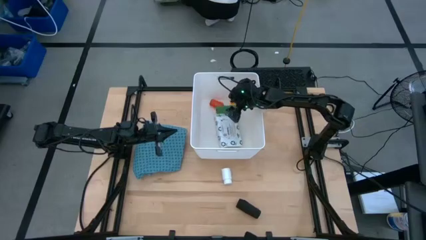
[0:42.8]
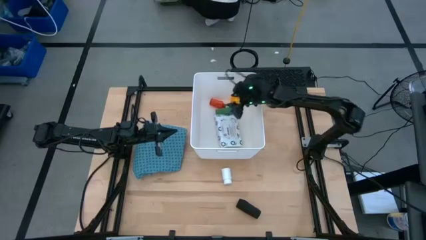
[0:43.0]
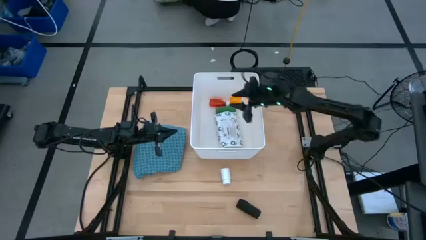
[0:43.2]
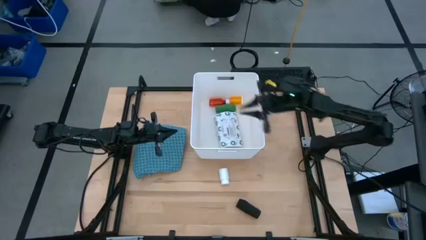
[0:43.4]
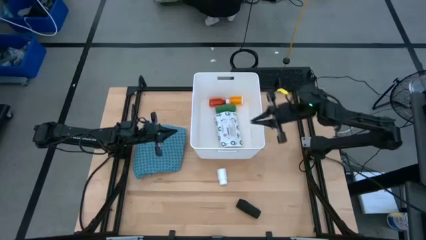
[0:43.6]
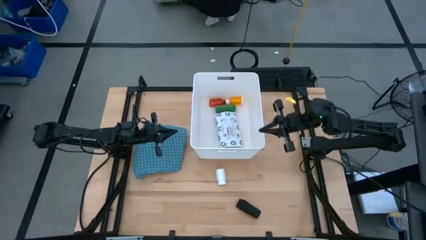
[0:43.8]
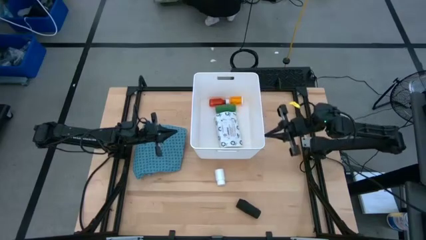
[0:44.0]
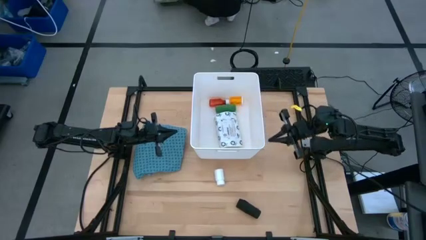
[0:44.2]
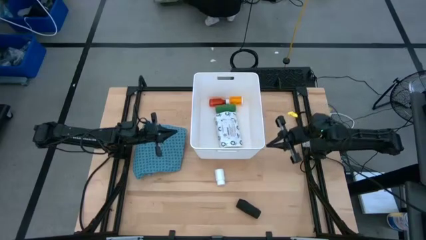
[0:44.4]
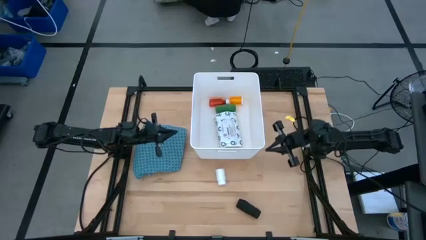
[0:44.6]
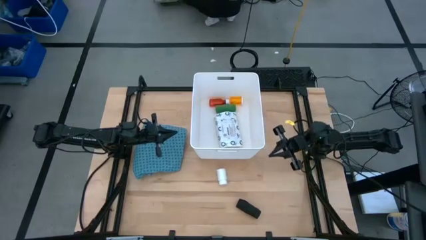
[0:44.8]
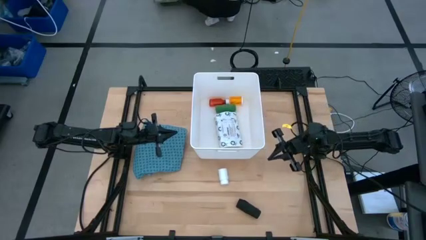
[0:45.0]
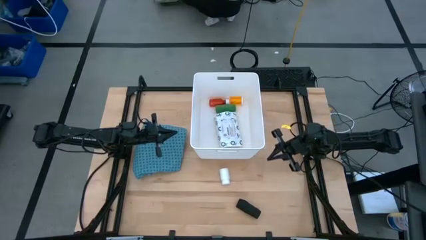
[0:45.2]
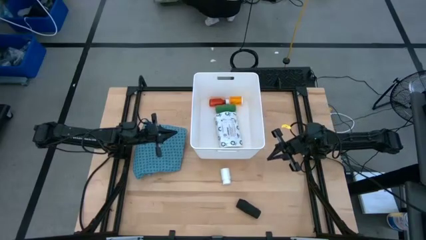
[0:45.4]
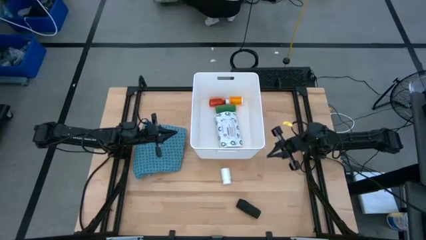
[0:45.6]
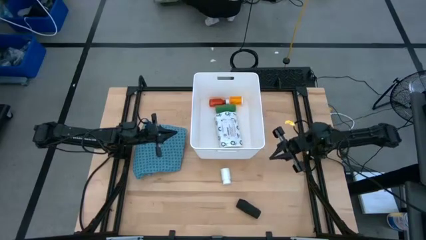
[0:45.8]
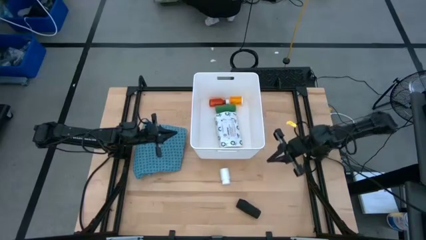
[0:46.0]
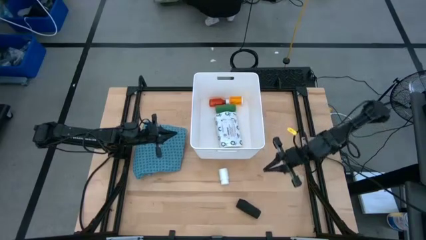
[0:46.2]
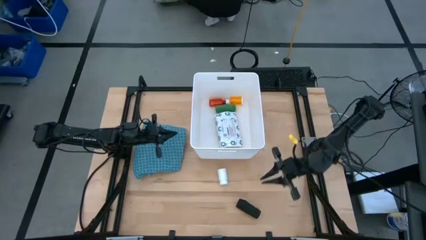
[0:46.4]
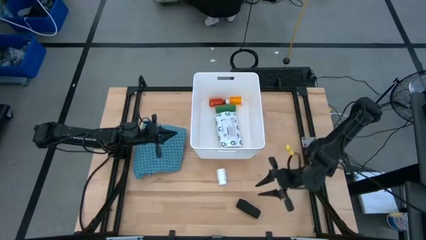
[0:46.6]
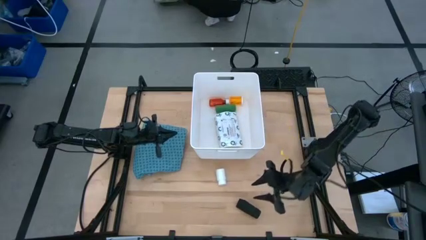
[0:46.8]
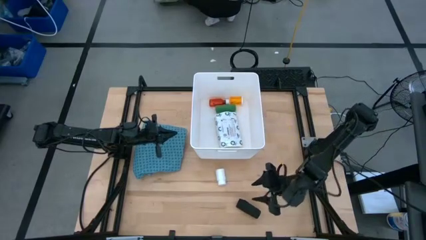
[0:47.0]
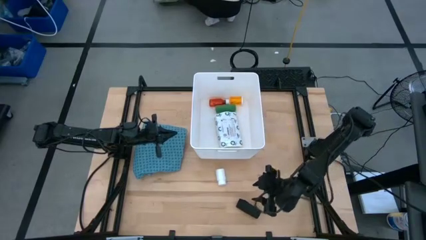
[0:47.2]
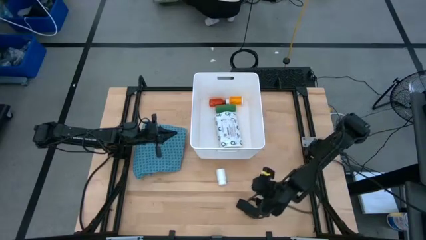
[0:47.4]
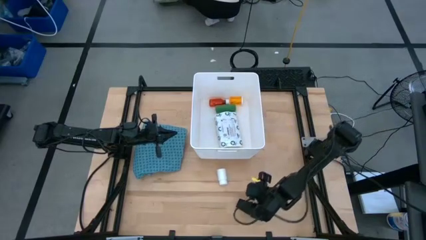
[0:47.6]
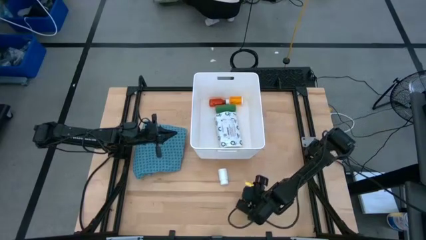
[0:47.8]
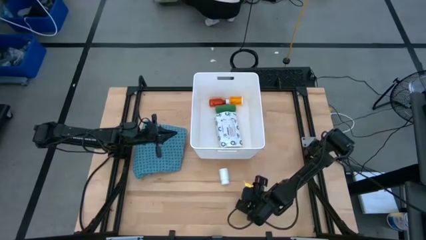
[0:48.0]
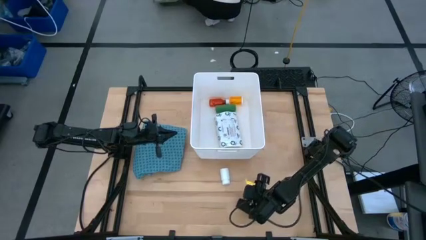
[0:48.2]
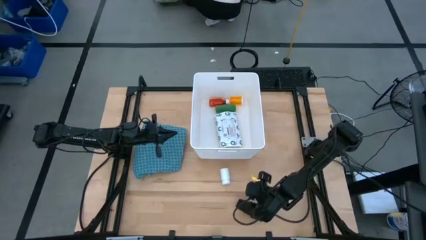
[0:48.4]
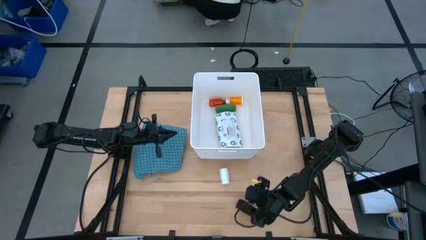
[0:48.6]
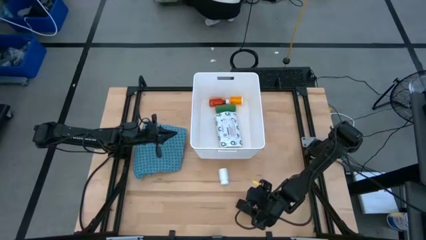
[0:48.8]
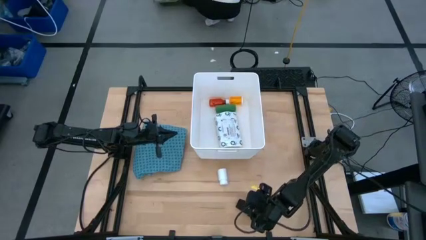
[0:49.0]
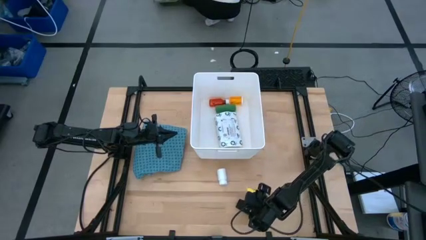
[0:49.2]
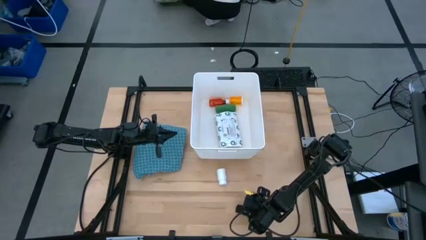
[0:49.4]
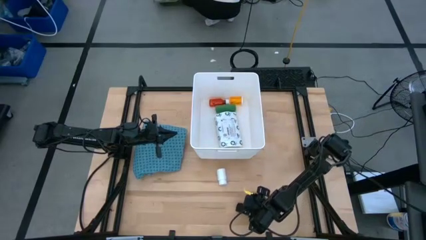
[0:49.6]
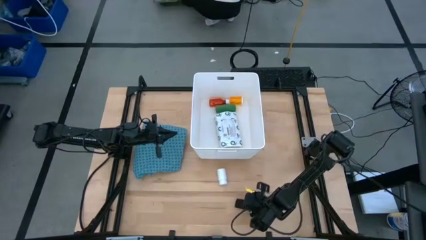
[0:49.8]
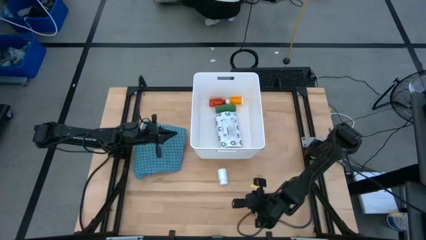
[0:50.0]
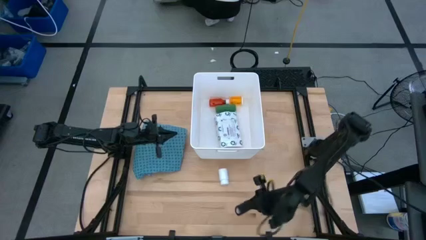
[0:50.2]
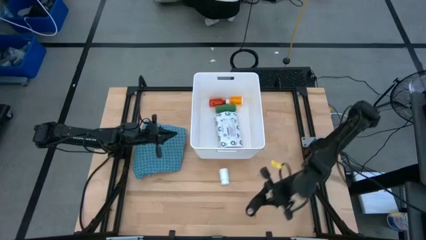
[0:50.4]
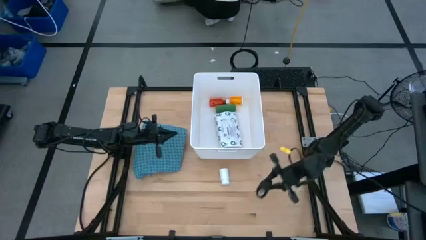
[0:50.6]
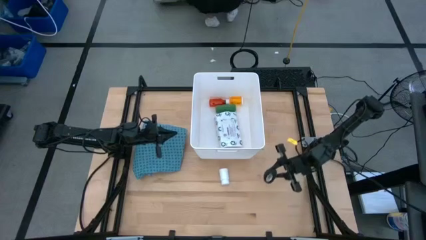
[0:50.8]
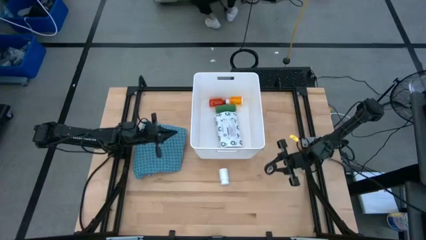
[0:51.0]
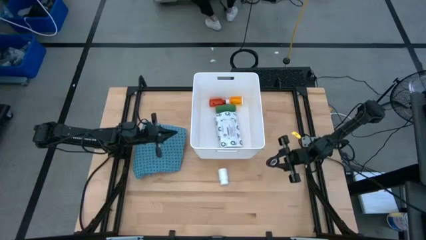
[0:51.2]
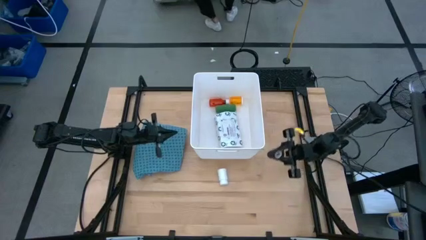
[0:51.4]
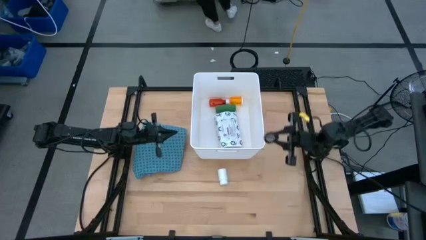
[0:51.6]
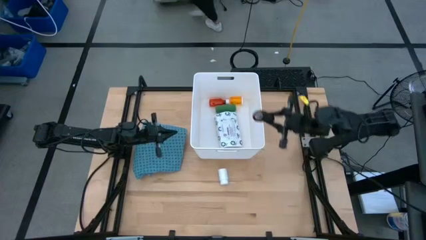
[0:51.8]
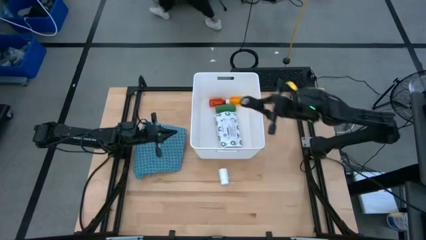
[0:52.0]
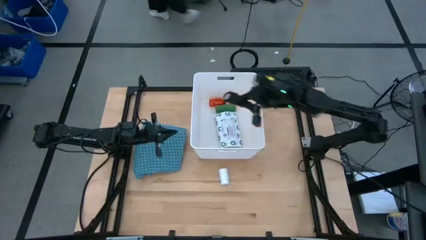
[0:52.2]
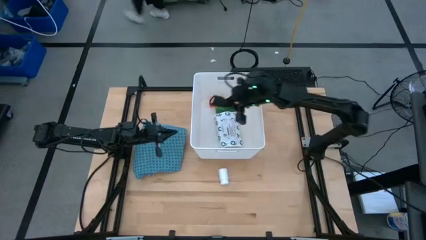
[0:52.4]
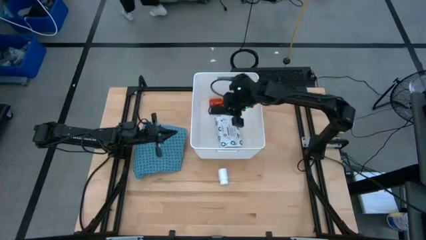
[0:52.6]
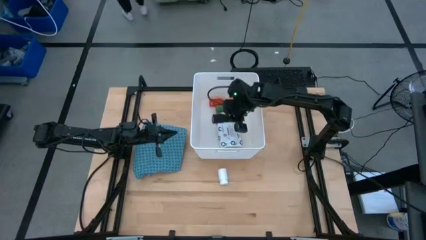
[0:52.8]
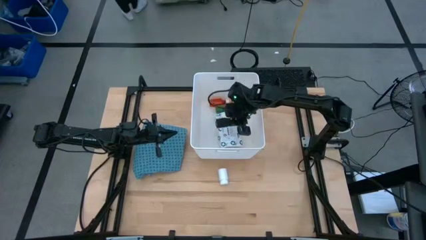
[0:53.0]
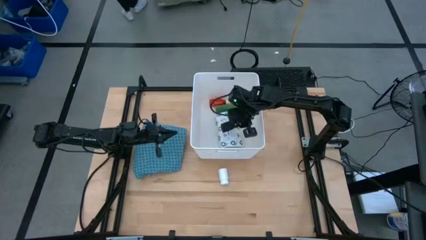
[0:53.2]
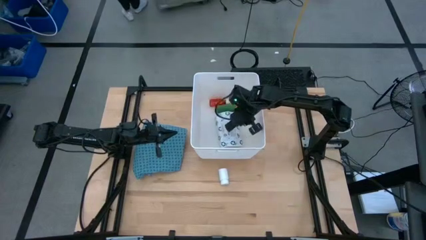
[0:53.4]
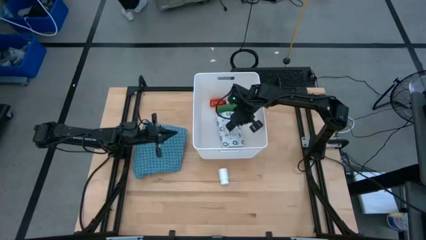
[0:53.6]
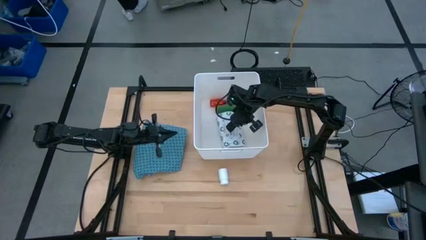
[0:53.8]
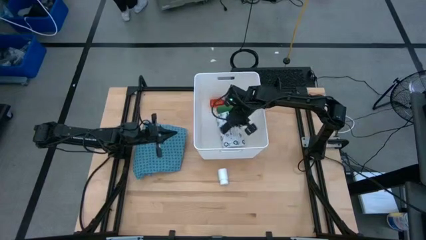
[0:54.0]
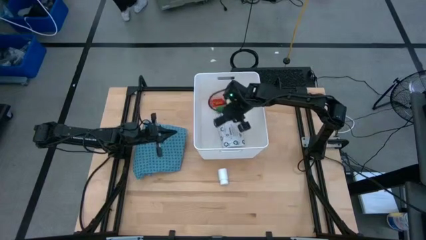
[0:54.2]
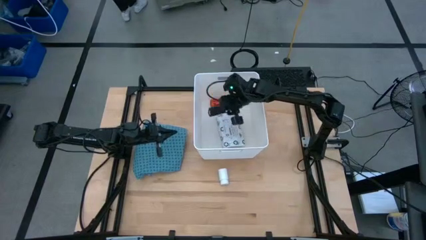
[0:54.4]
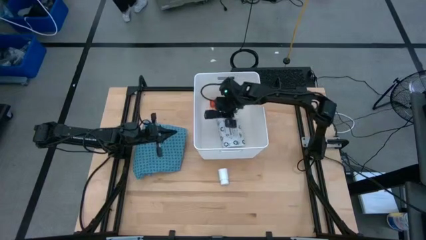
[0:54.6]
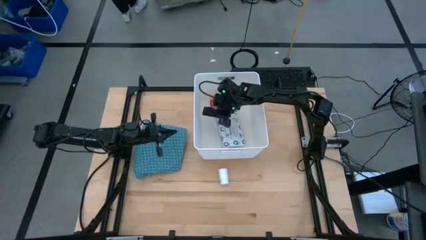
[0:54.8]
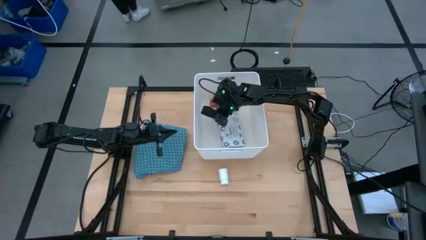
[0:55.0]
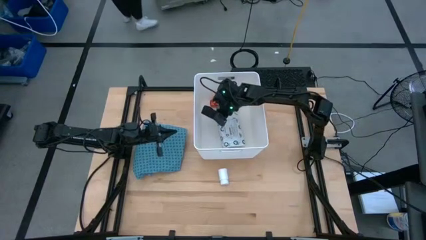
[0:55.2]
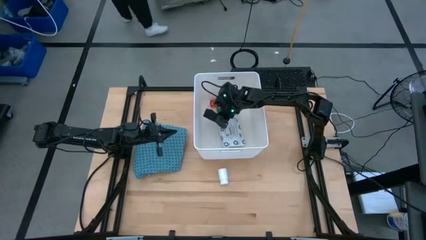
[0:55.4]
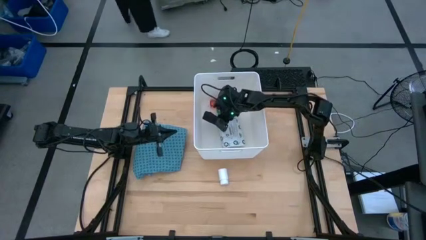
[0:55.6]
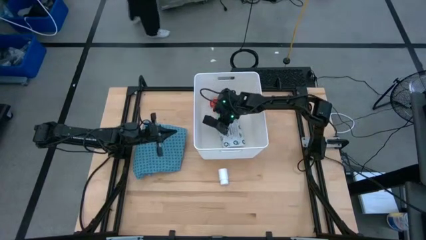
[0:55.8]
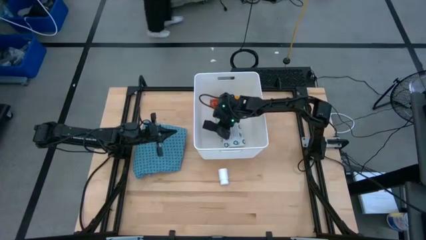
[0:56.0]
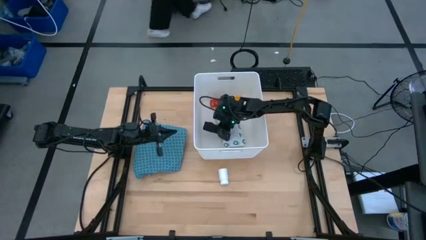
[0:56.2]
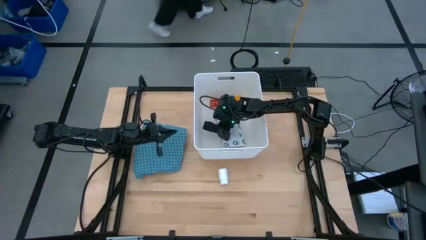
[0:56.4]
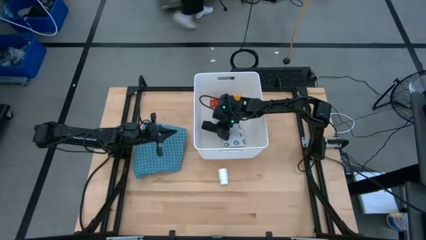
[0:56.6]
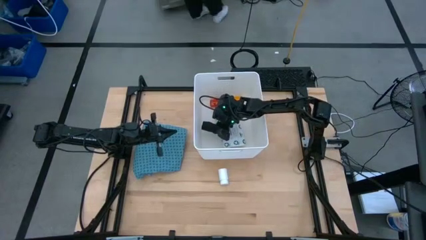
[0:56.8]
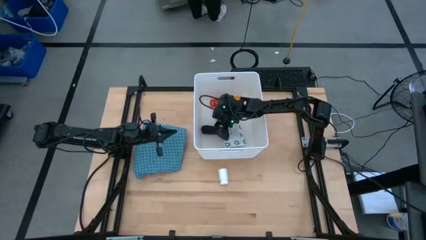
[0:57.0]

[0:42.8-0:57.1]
Task: Pick & place medical supplies in basket/bin
Put the black bandage into the white bin

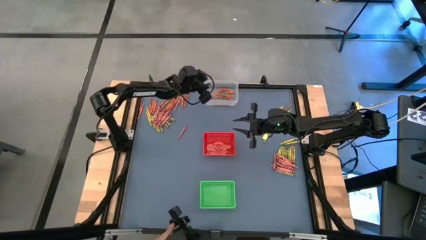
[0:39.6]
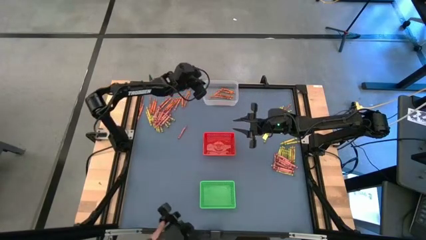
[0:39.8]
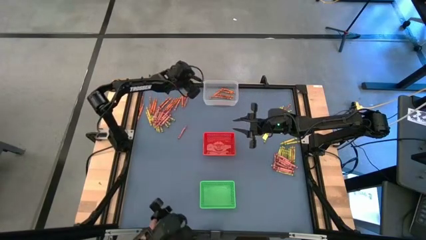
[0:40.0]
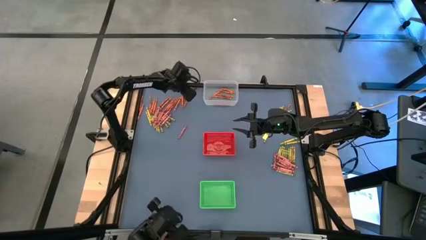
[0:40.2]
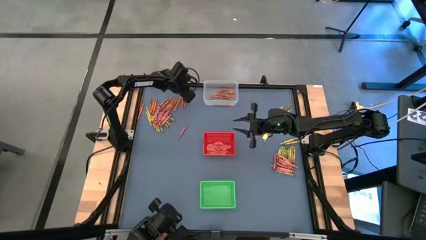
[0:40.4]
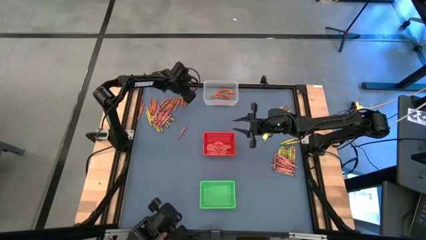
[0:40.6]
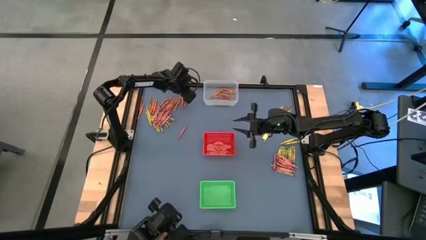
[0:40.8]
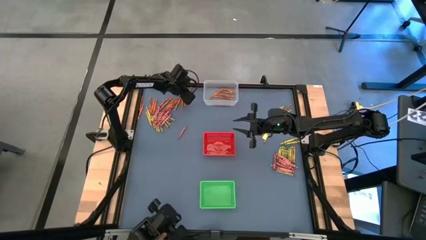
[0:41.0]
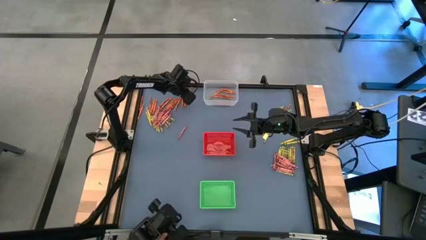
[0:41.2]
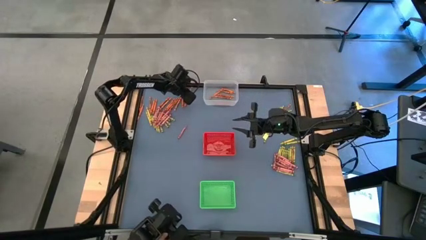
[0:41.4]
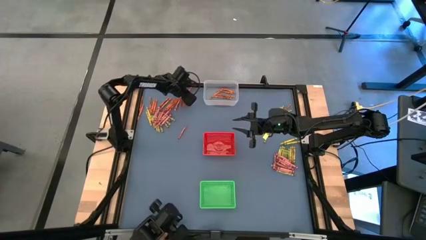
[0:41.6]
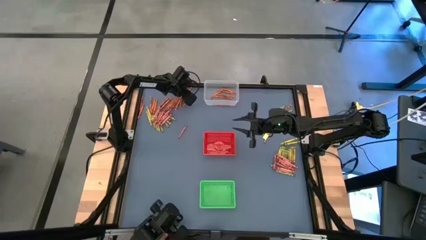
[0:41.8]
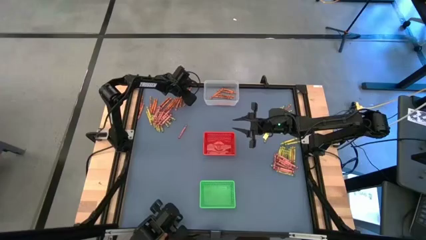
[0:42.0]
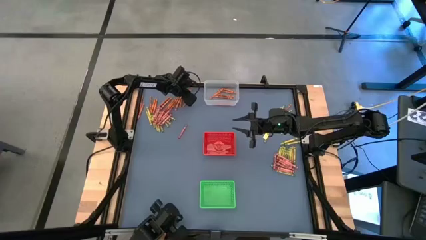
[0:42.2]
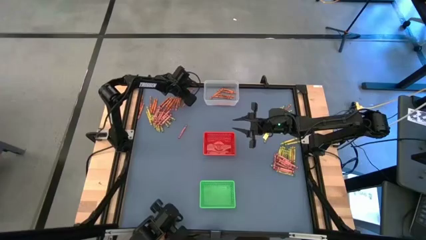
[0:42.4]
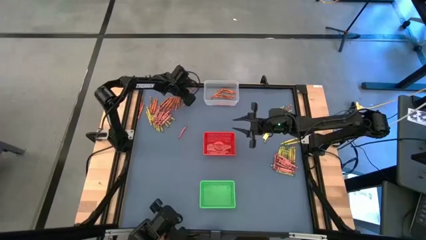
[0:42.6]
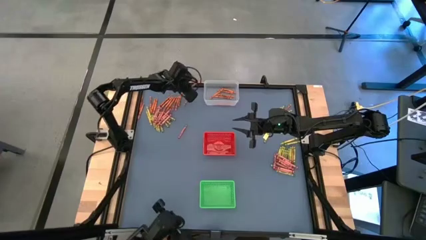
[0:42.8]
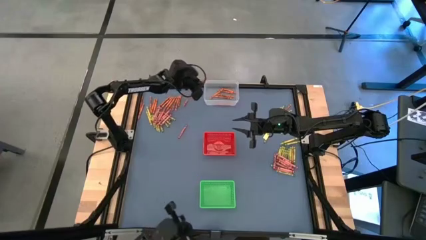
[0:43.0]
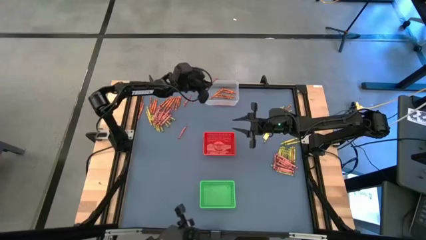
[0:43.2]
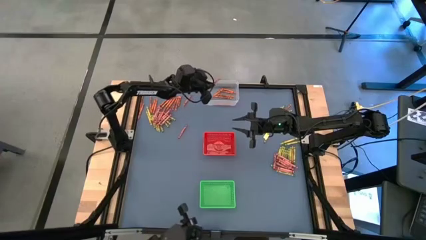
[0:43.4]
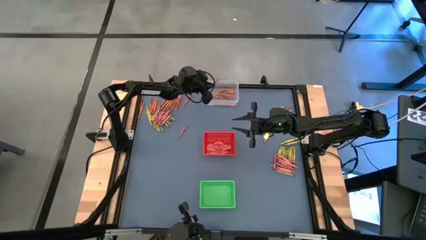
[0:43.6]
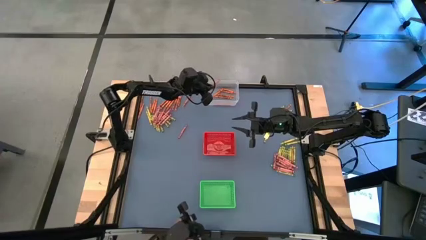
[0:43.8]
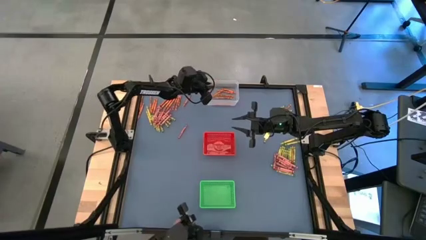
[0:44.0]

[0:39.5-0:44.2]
Task: Sort crayons
Put the orange crayon into the transparent bin
